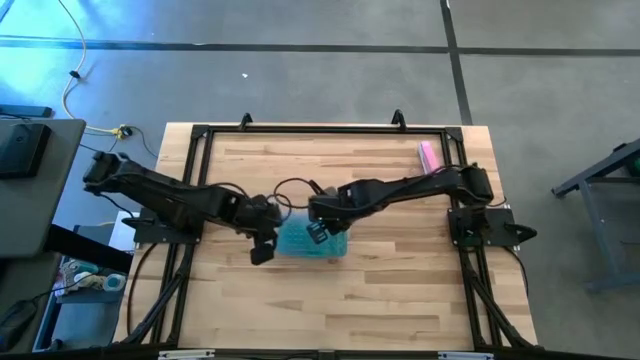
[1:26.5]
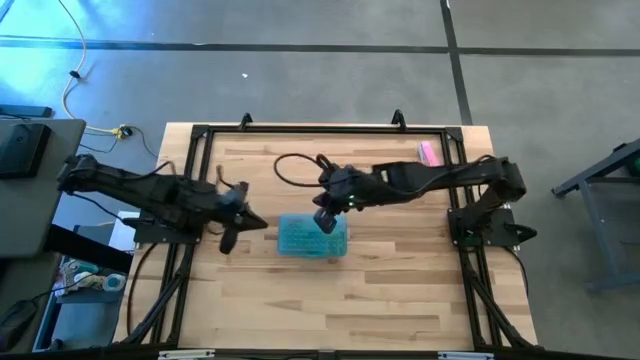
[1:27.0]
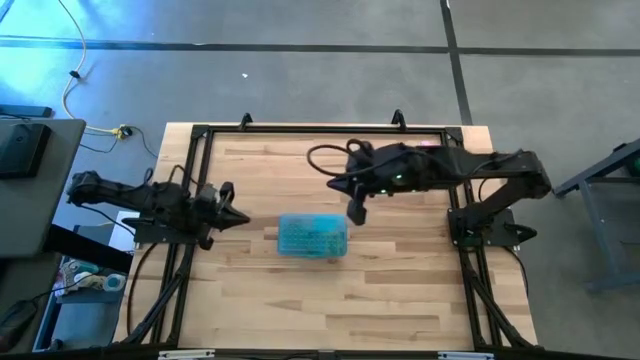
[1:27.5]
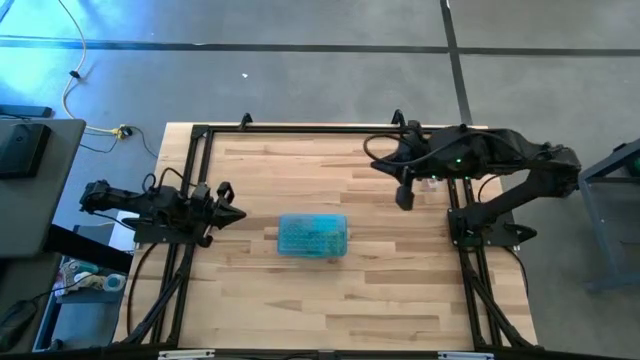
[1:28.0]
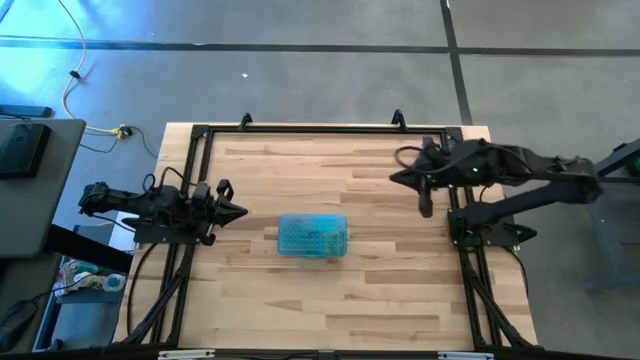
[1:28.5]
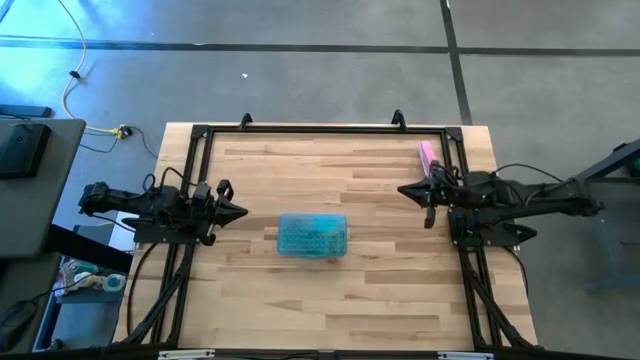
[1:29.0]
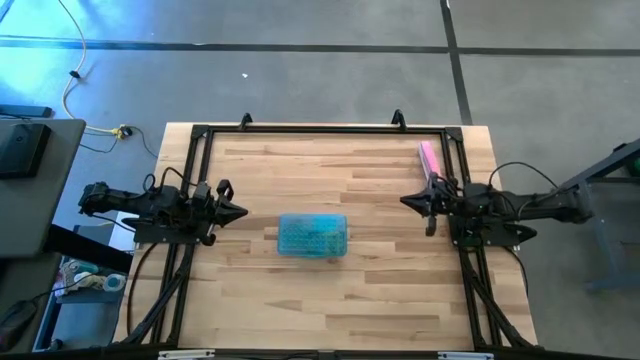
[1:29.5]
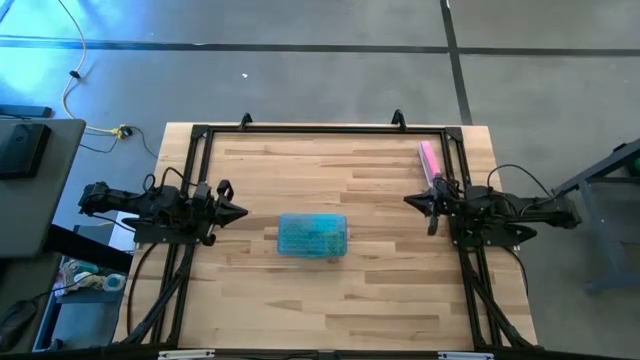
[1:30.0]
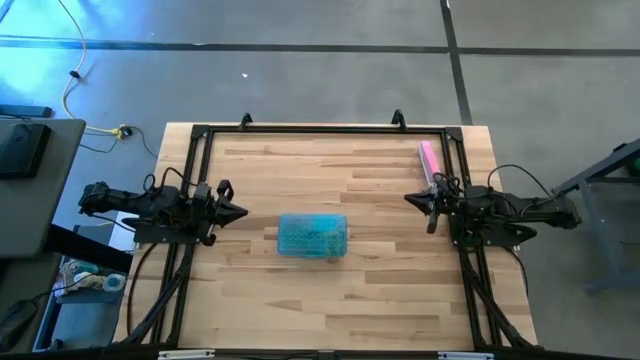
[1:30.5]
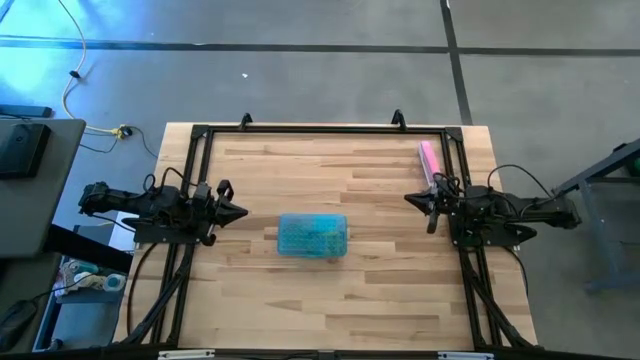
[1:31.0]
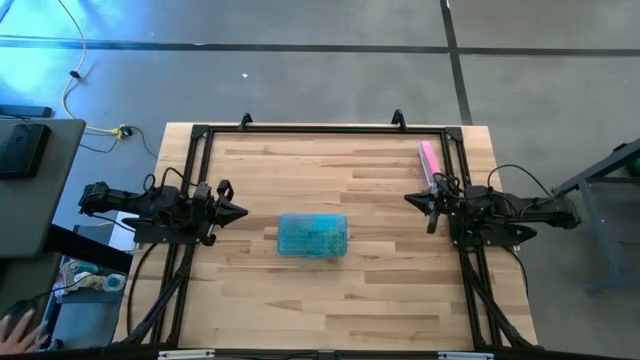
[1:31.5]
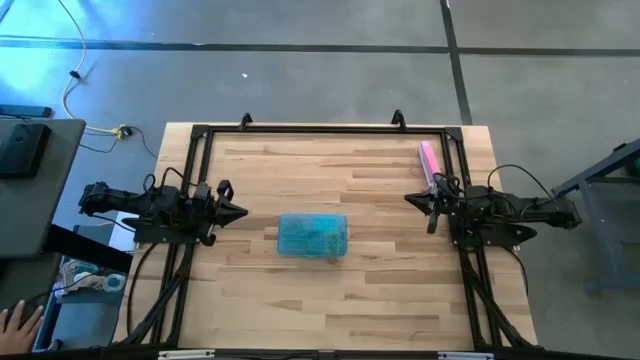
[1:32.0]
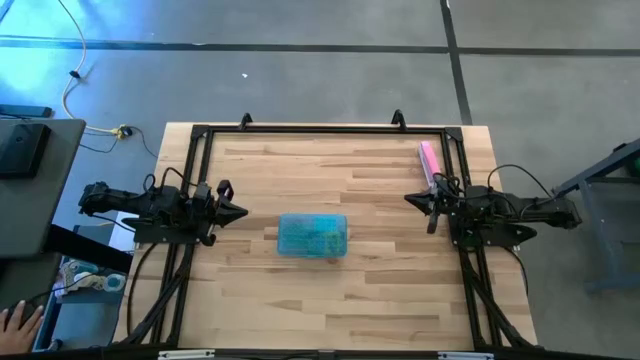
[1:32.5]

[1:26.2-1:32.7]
Task: Pack school essentials
Return to Home Position

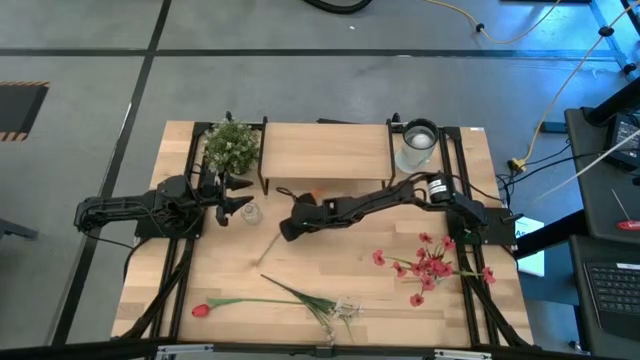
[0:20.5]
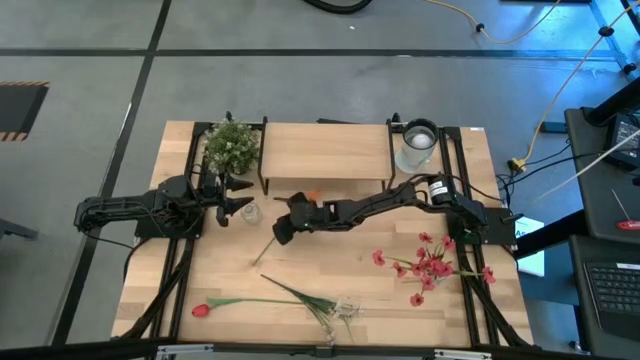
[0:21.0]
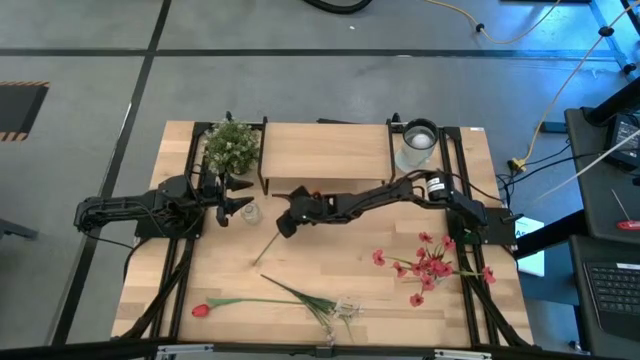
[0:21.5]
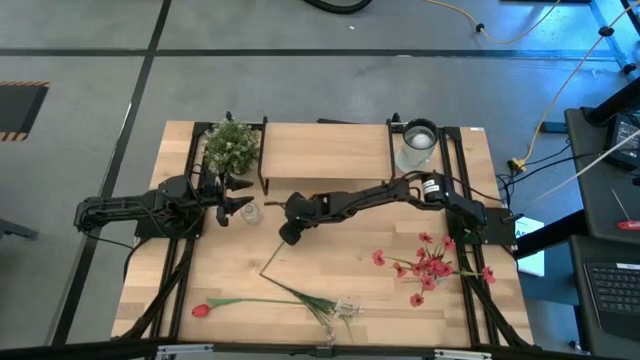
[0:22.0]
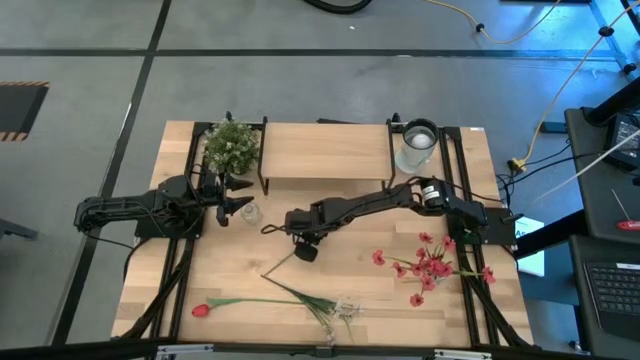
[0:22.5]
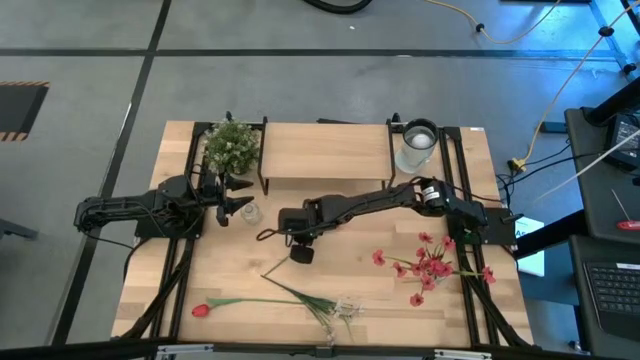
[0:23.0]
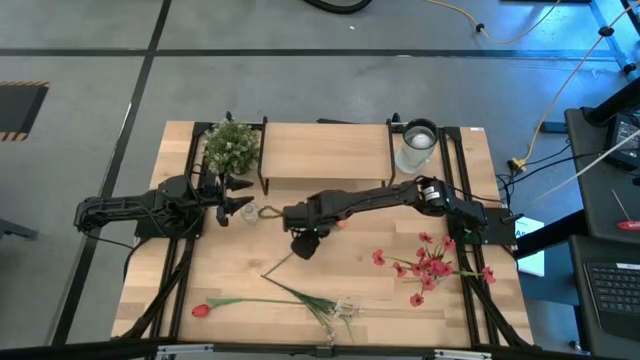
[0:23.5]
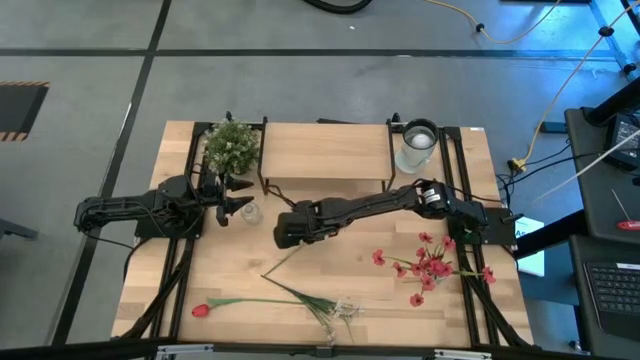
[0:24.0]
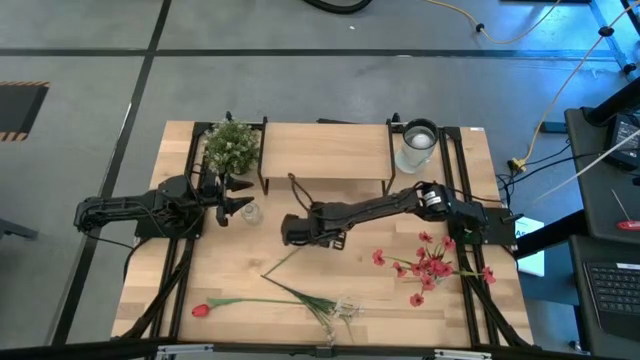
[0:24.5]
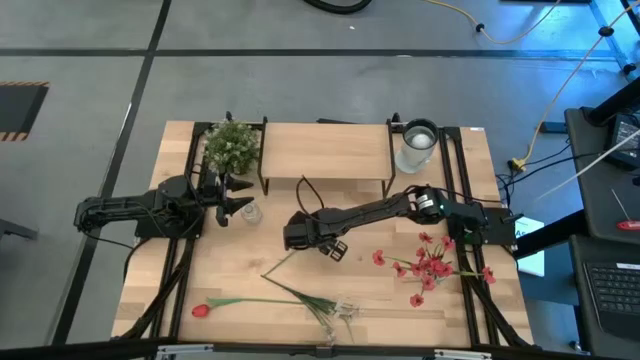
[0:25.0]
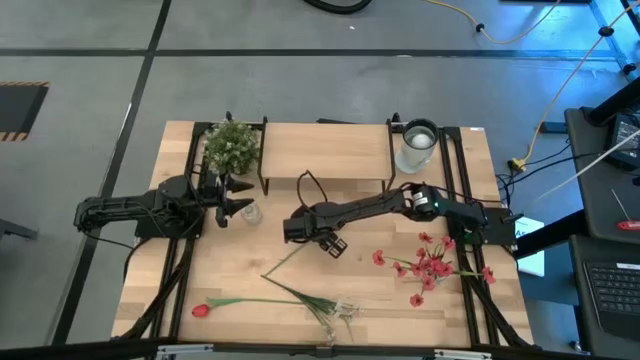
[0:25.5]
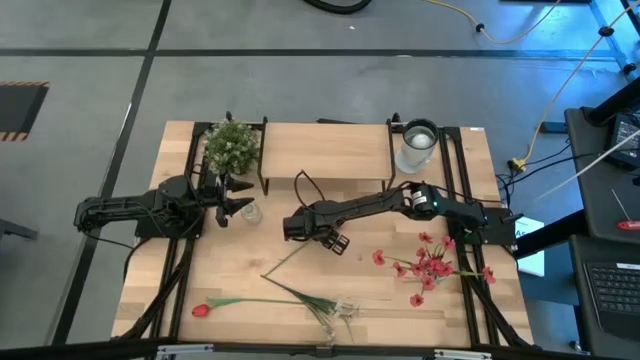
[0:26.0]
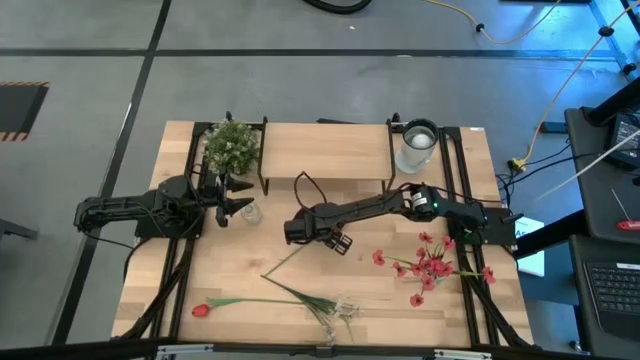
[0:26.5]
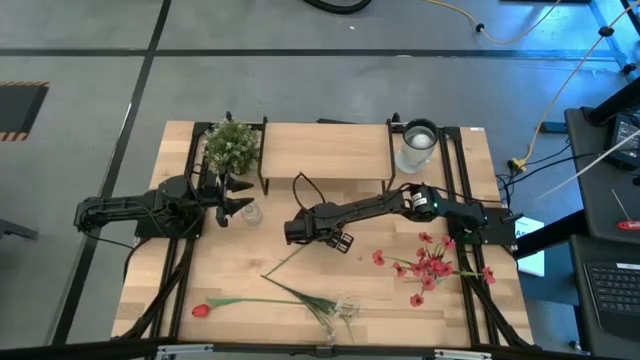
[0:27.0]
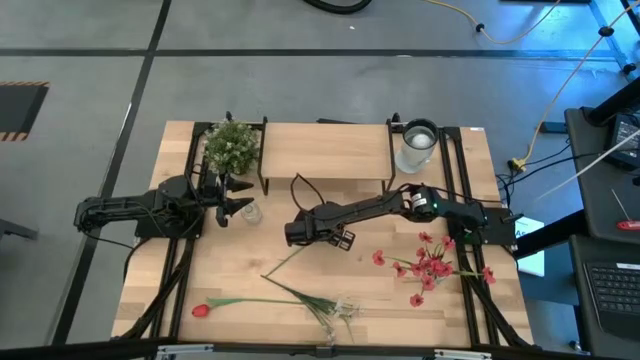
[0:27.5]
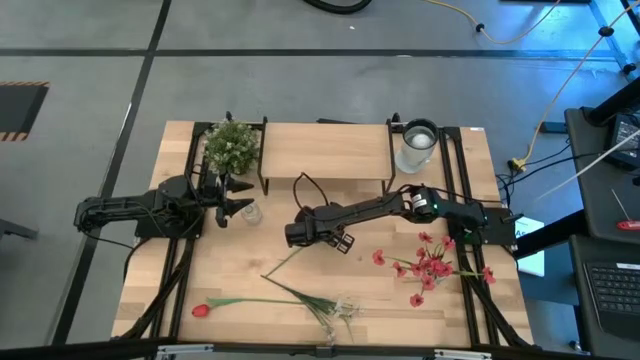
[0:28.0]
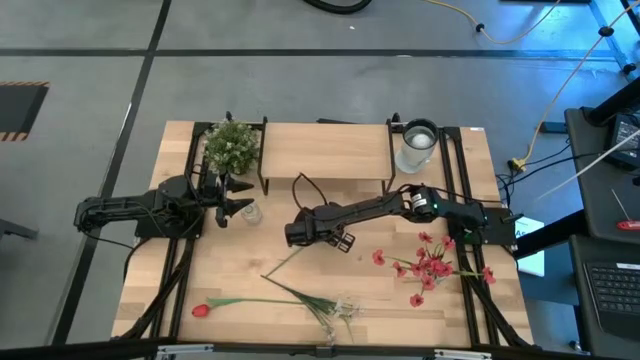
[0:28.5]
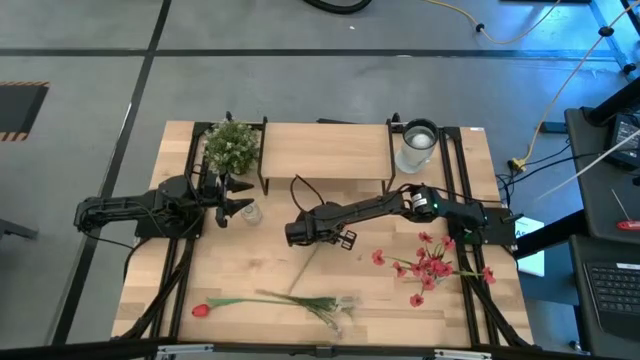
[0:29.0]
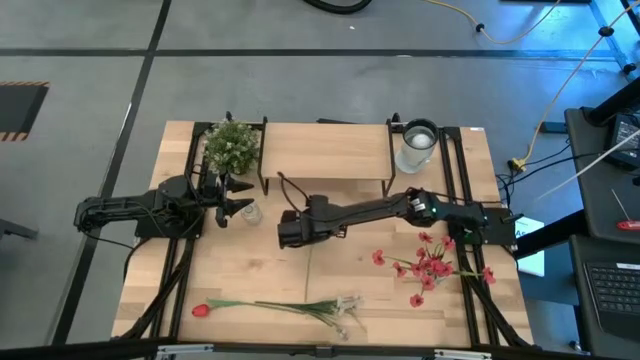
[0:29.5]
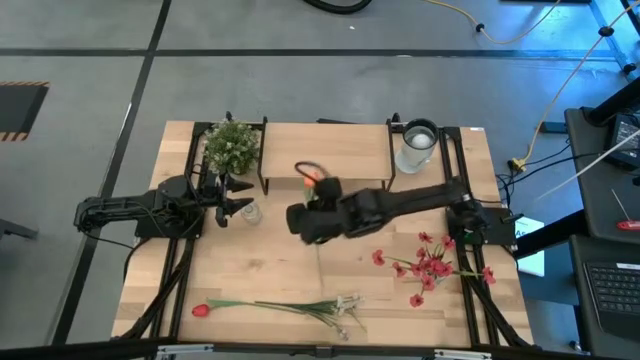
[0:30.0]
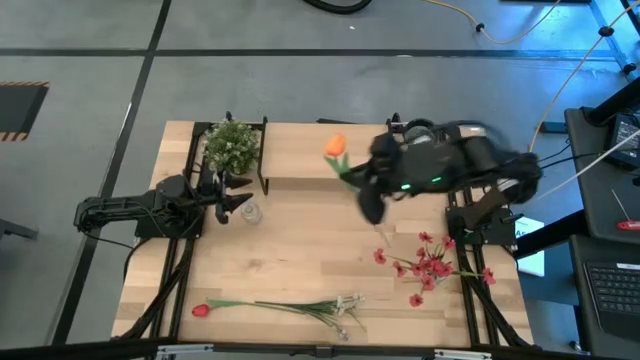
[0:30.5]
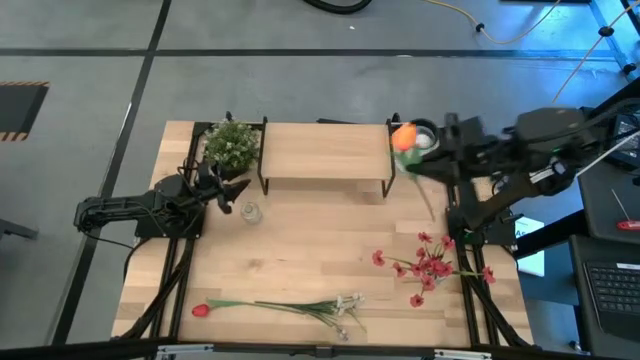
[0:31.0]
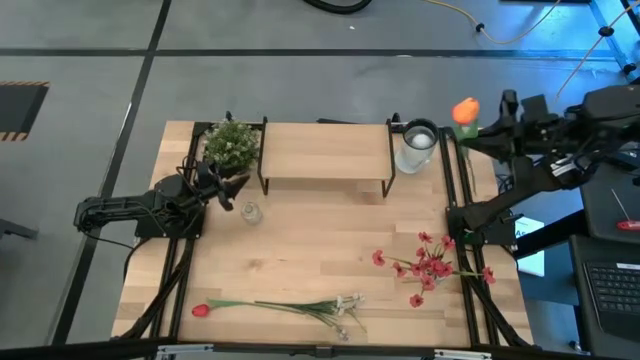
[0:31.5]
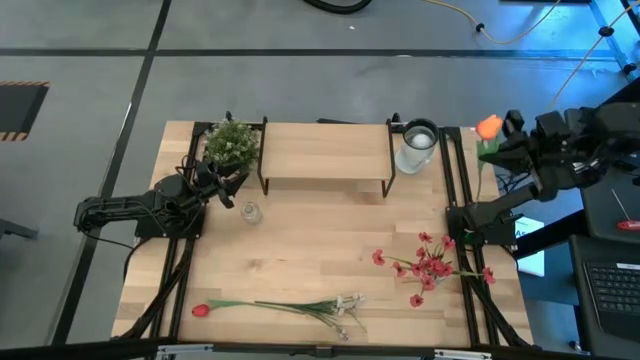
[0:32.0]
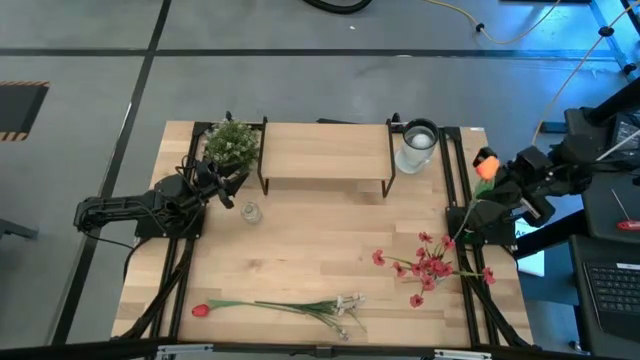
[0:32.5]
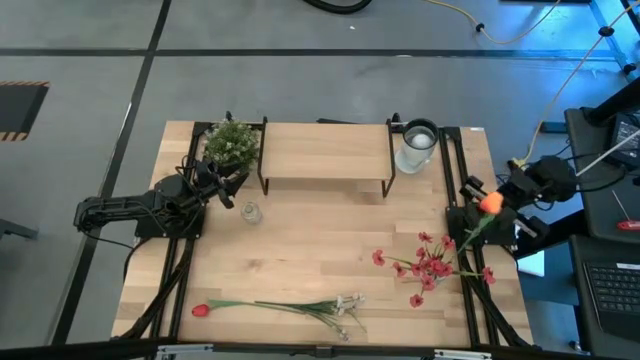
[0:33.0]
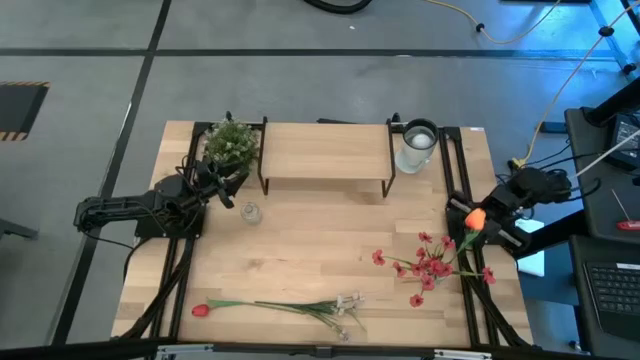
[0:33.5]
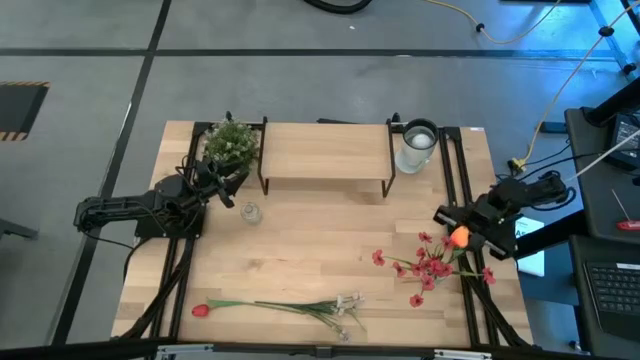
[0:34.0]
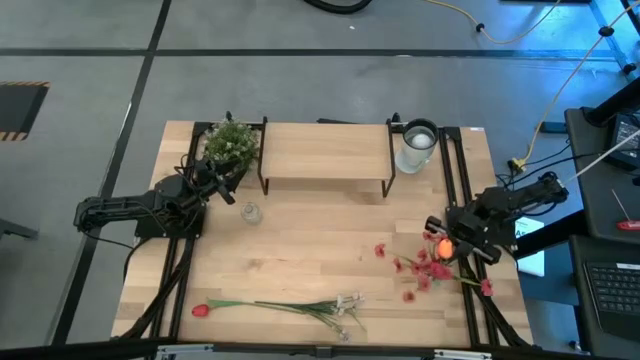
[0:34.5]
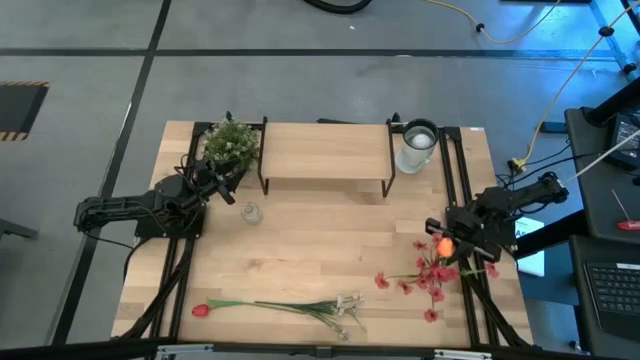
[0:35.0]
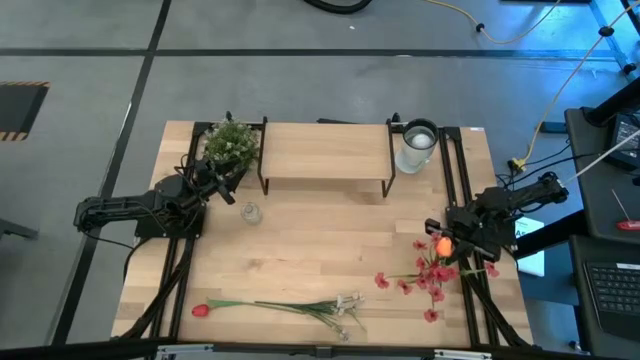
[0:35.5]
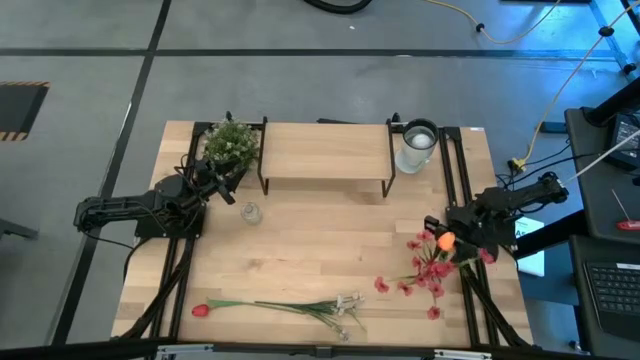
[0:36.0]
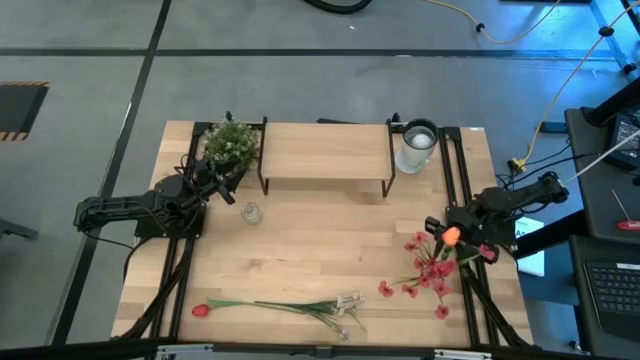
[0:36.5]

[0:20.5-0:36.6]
Task: Pick and place flowers into a vace then onto a shelf
Put the orange flower into the bottom transparent vase
